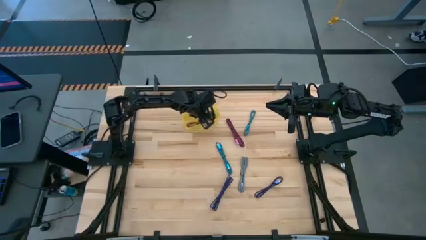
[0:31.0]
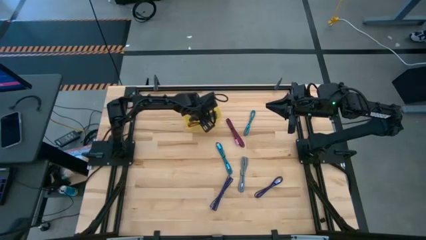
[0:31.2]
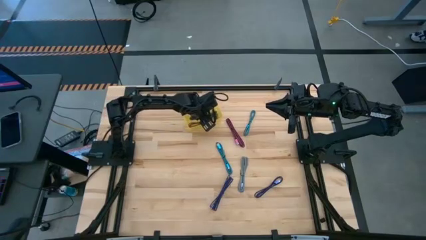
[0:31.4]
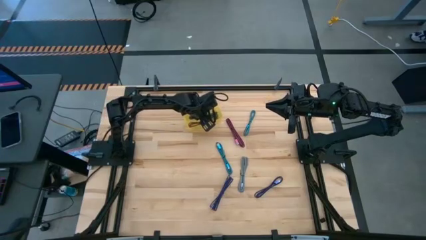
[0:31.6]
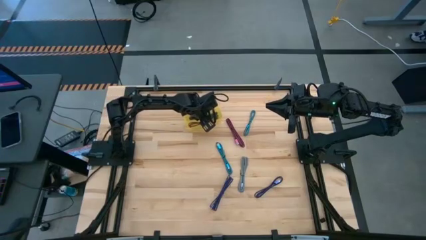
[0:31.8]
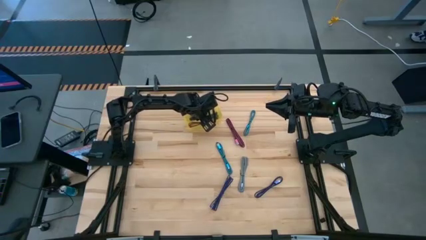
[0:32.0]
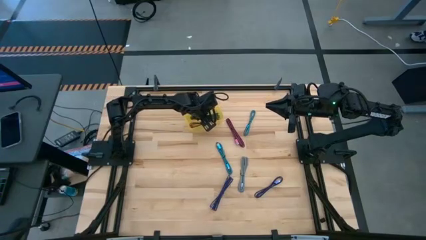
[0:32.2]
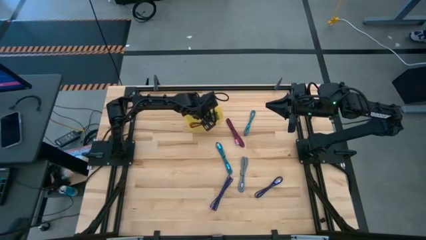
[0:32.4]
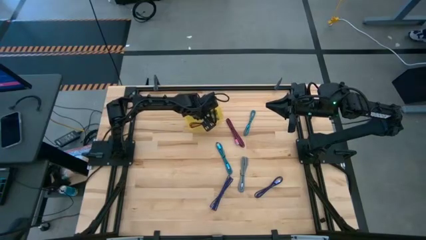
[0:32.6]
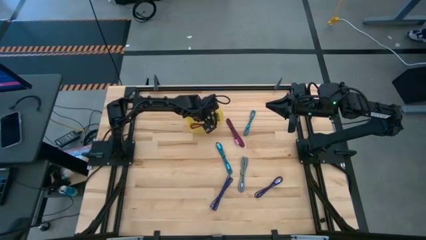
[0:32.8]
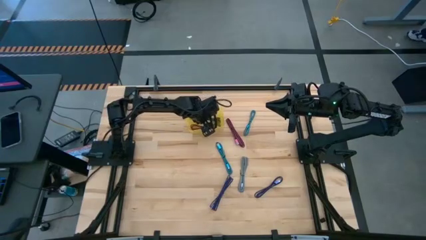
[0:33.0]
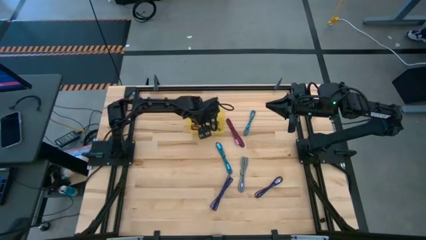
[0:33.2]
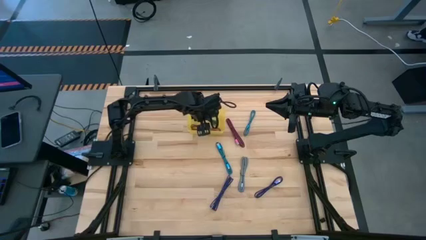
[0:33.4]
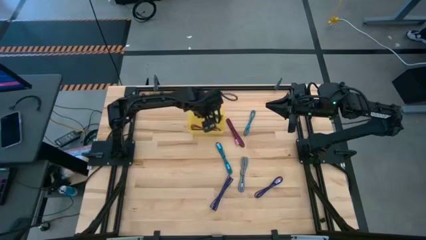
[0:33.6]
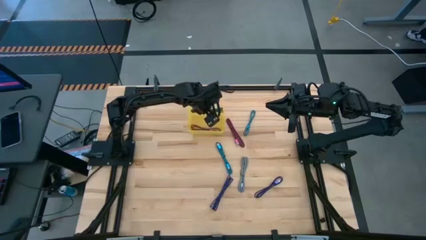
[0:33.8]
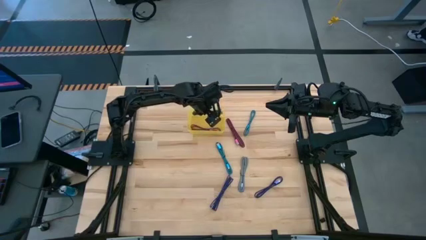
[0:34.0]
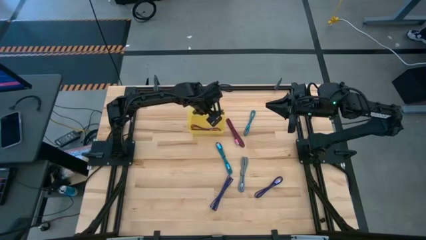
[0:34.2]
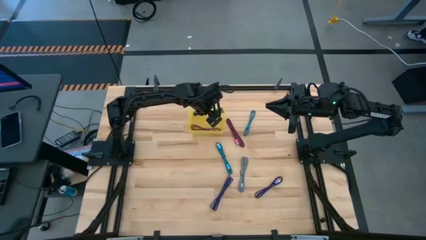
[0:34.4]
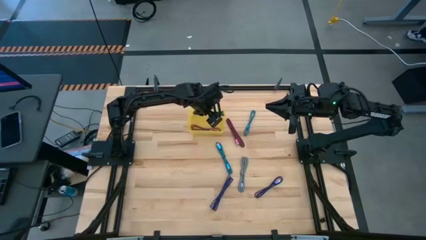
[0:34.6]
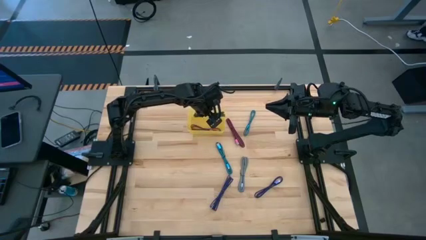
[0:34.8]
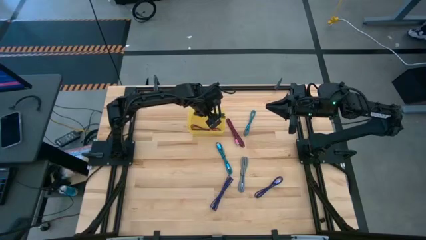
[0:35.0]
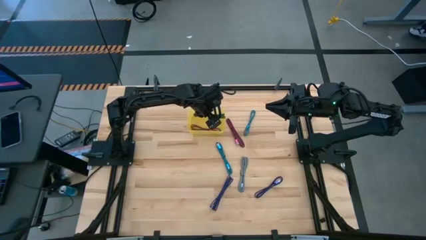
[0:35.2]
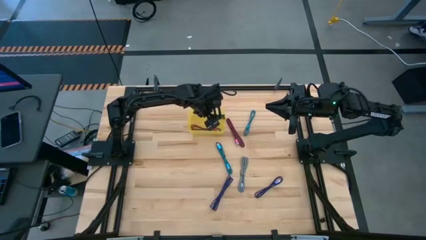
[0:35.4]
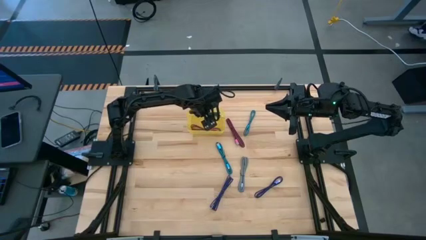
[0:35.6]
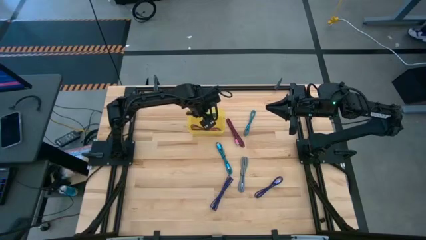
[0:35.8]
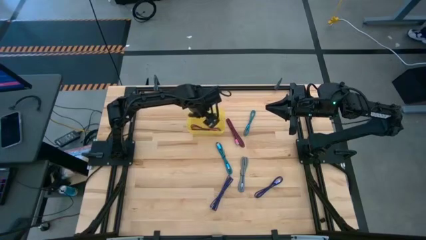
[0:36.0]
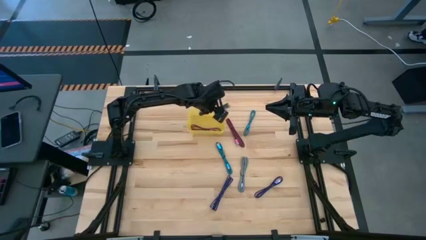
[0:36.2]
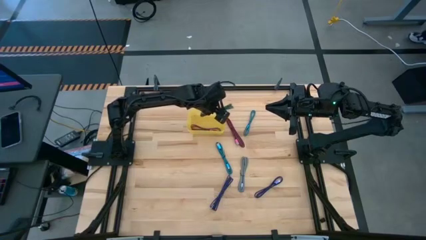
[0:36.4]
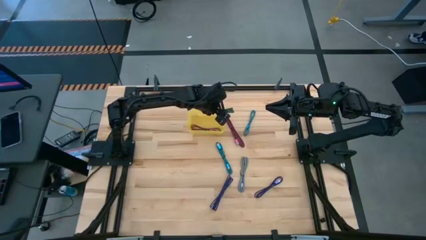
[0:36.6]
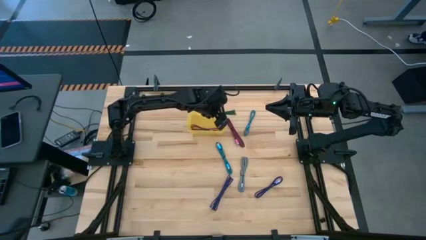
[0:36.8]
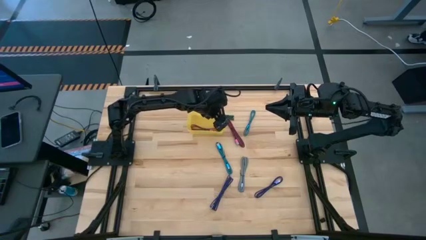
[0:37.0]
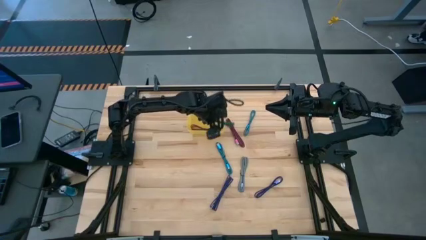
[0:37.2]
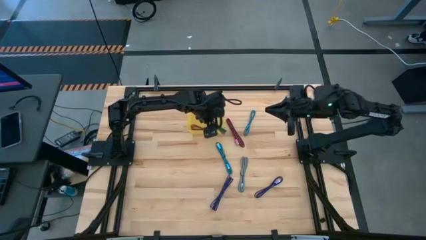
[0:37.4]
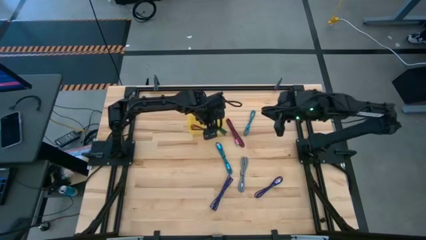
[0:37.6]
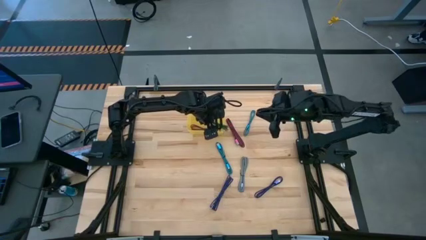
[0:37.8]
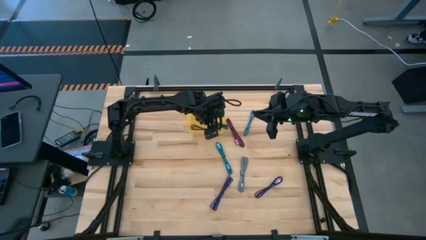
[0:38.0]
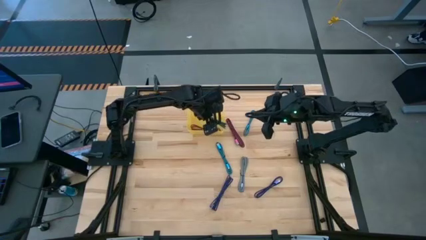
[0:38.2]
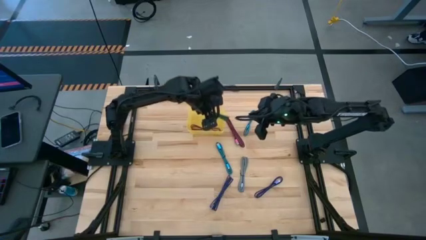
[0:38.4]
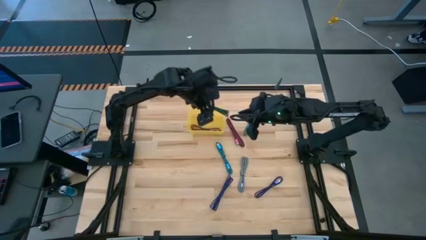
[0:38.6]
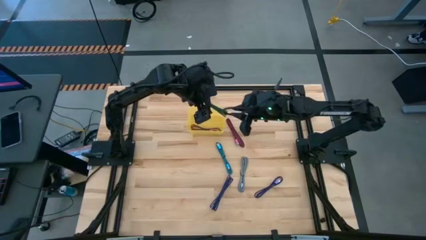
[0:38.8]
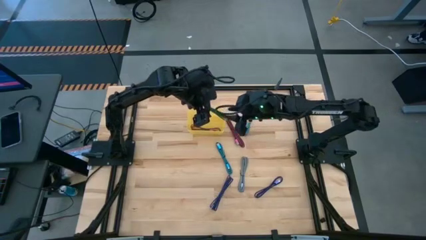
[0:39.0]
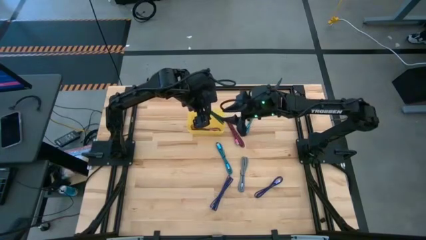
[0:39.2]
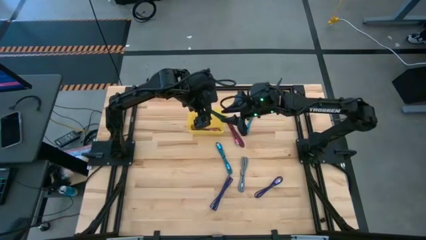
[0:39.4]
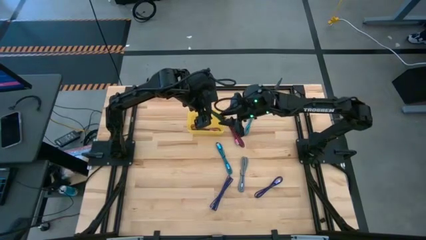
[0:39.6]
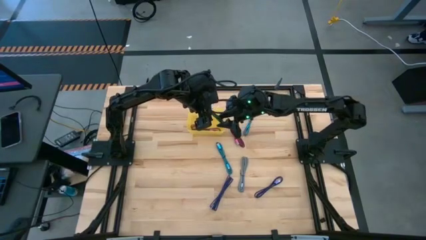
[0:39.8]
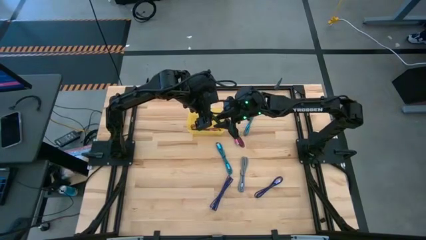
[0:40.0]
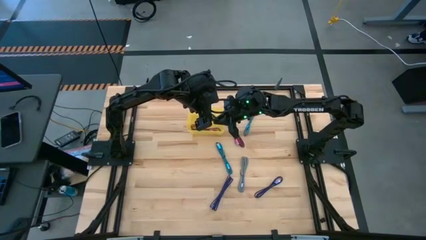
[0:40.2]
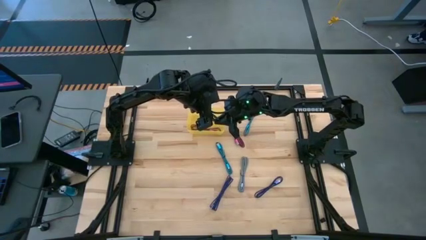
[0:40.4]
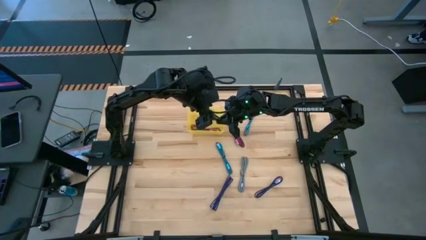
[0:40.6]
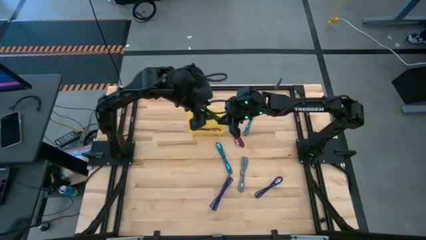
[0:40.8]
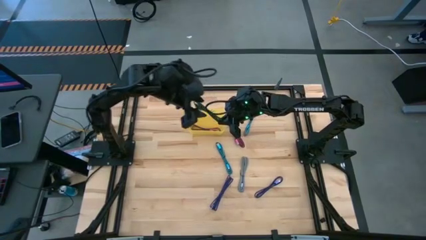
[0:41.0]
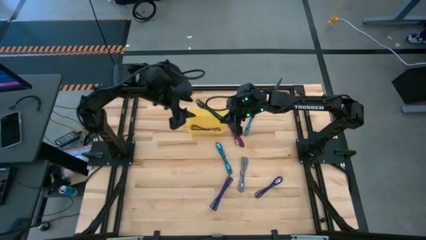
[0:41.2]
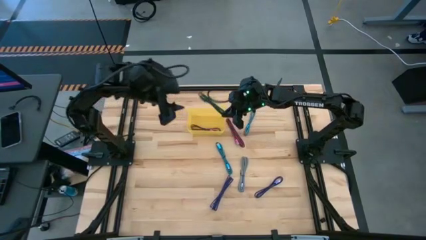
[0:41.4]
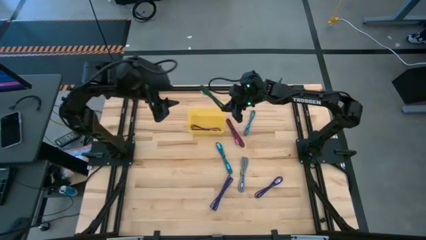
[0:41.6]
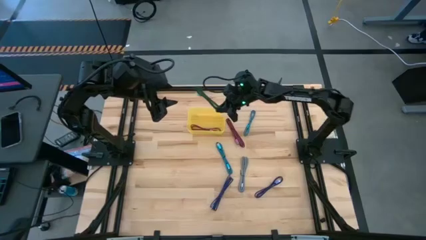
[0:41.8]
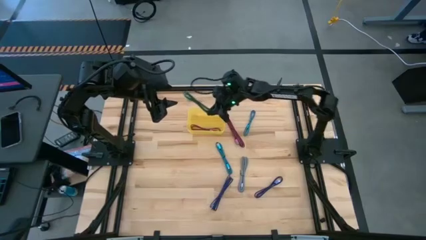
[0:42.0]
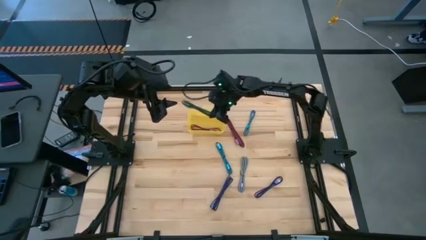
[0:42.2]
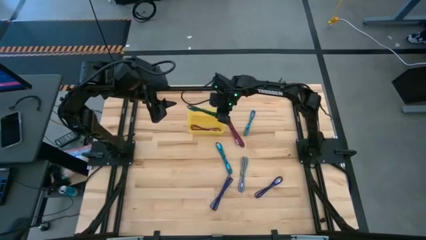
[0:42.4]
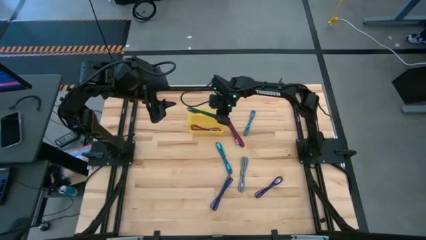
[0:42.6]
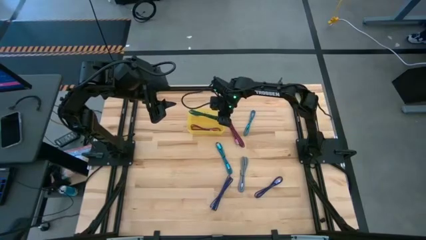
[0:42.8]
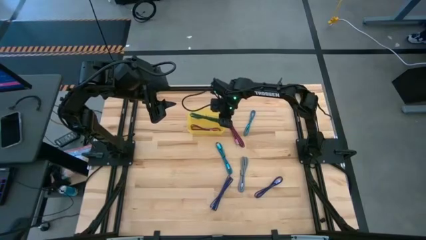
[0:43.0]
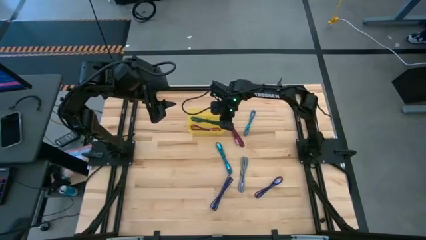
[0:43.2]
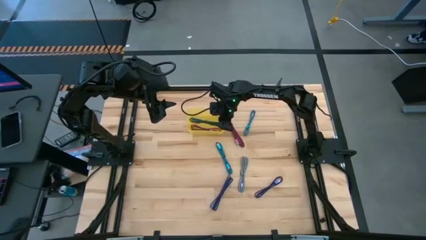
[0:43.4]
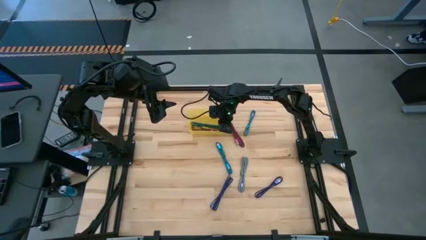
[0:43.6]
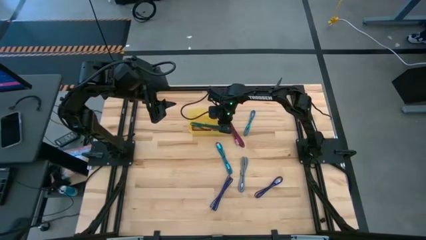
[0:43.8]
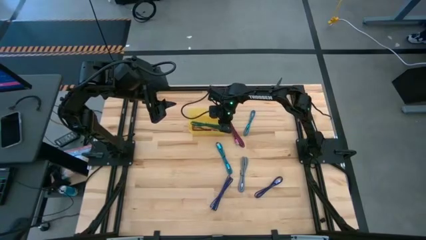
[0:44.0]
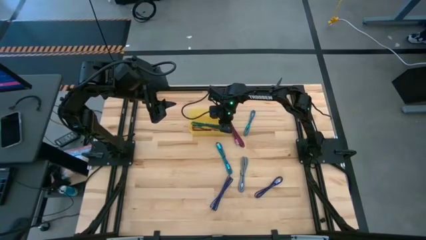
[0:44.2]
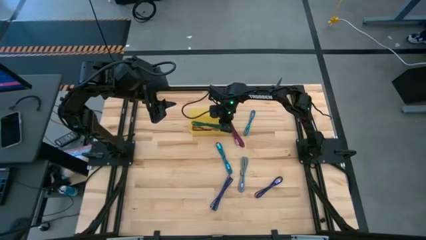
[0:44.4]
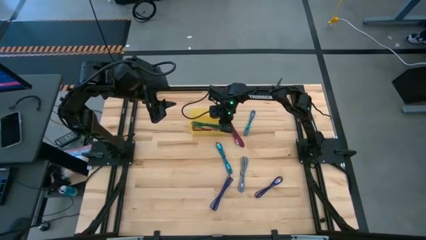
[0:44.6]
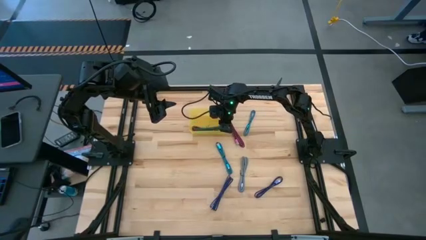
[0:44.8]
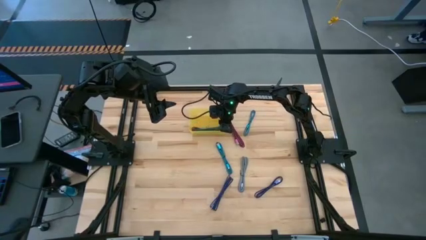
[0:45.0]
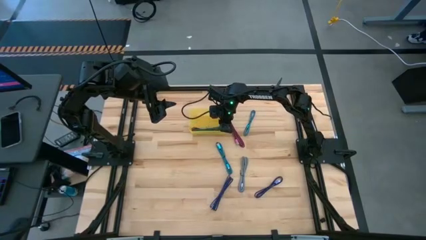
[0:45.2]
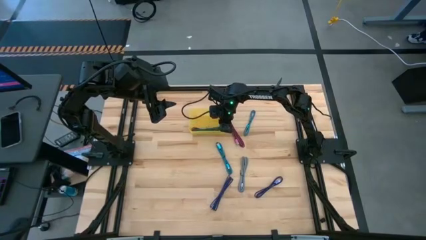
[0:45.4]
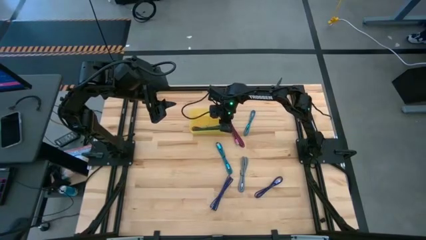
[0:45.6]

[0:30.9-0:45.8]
Task: Pick and place USB-C Cables
Put the green charger cable into the bin
